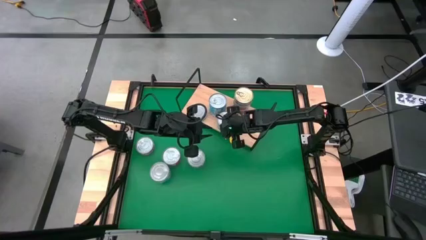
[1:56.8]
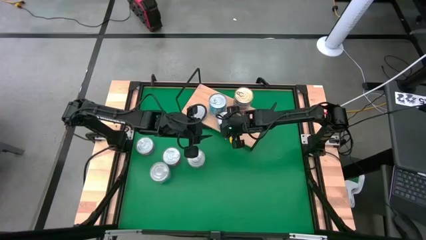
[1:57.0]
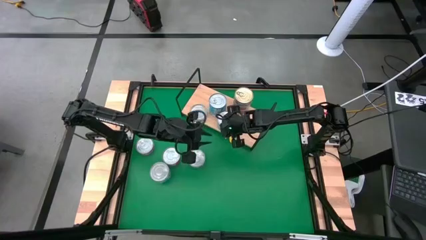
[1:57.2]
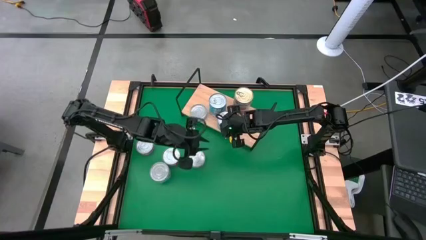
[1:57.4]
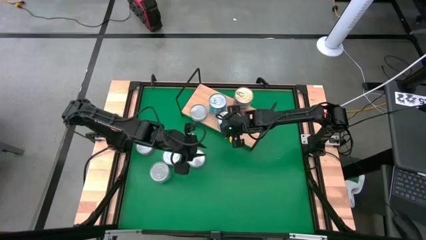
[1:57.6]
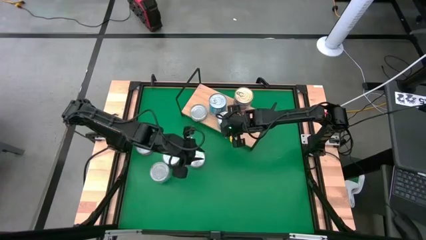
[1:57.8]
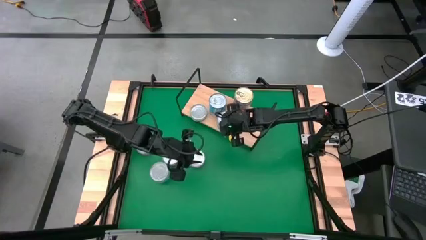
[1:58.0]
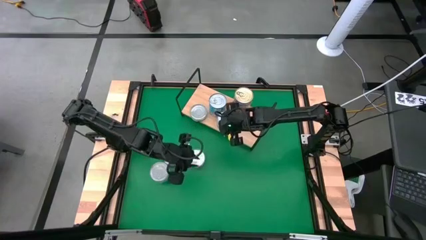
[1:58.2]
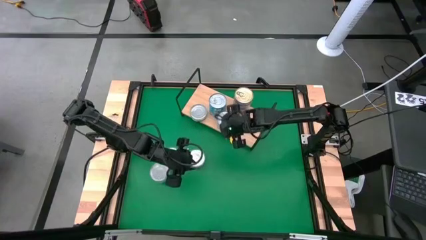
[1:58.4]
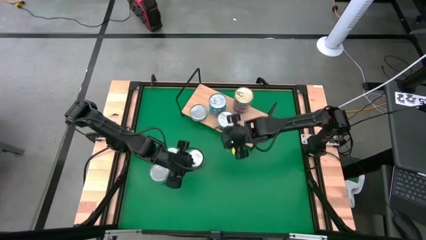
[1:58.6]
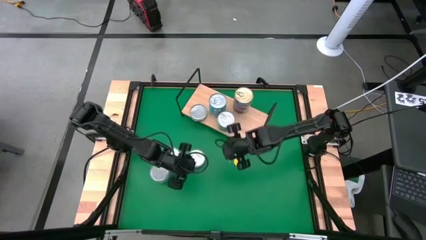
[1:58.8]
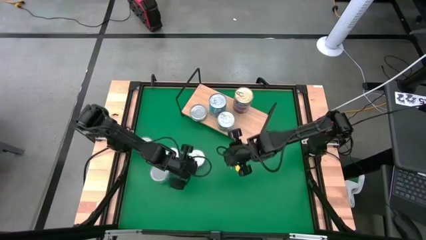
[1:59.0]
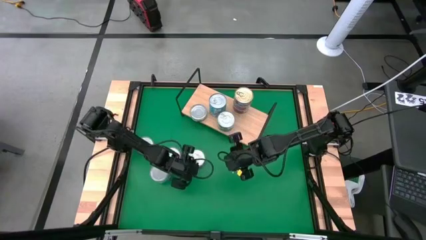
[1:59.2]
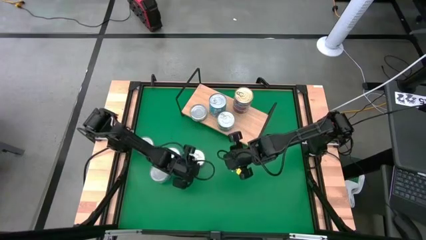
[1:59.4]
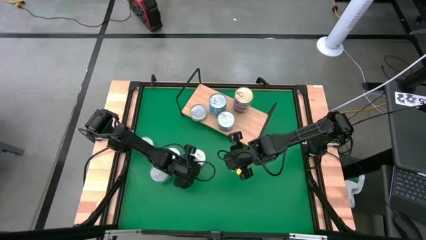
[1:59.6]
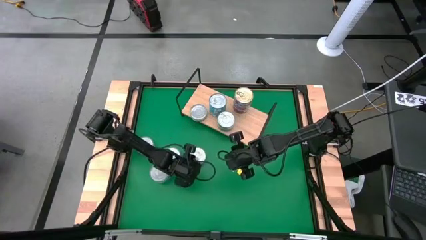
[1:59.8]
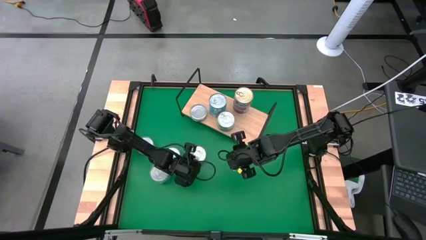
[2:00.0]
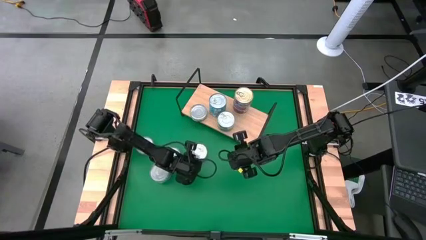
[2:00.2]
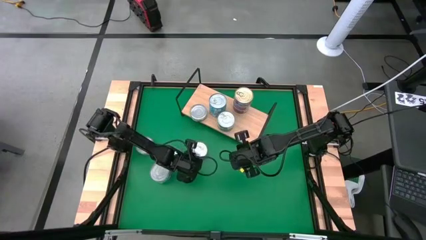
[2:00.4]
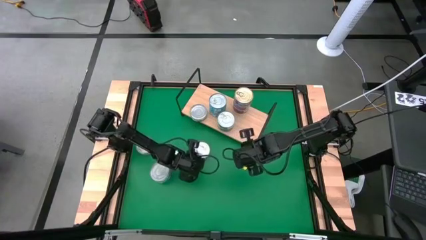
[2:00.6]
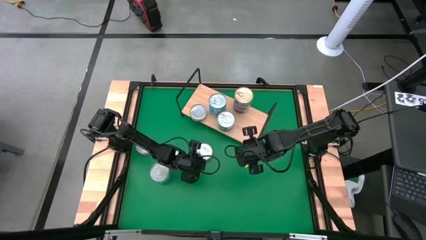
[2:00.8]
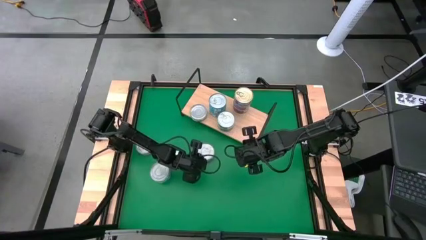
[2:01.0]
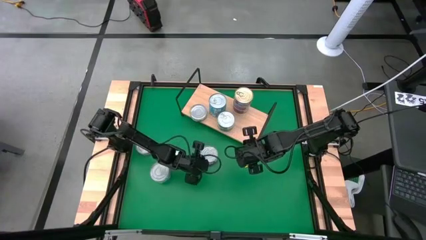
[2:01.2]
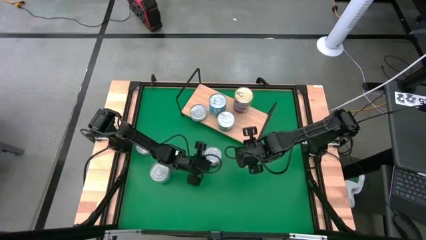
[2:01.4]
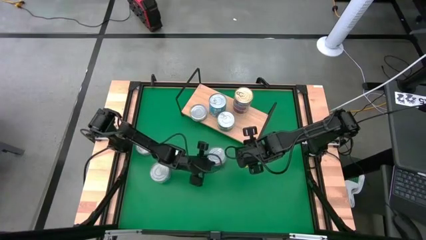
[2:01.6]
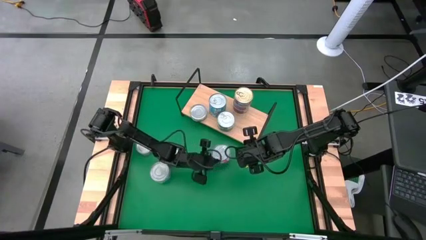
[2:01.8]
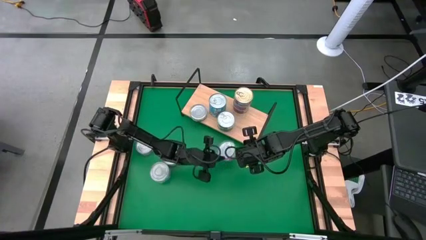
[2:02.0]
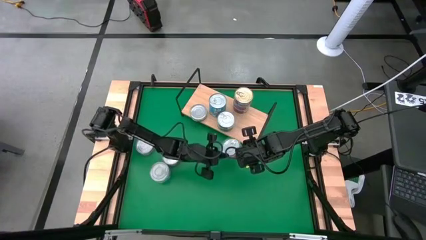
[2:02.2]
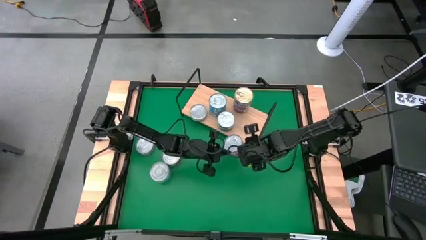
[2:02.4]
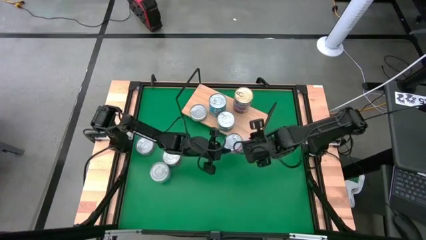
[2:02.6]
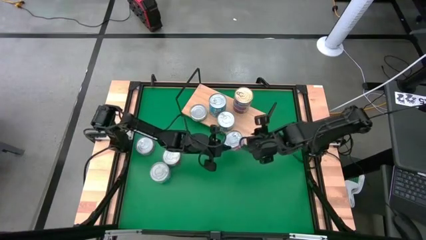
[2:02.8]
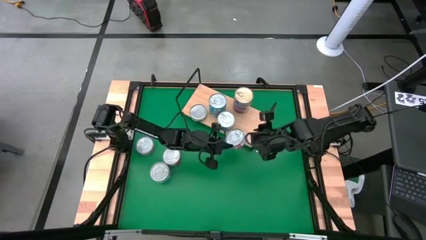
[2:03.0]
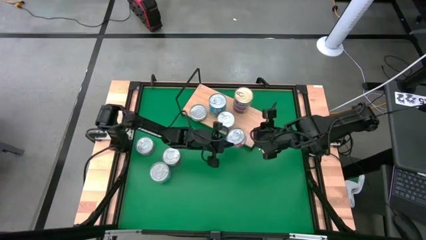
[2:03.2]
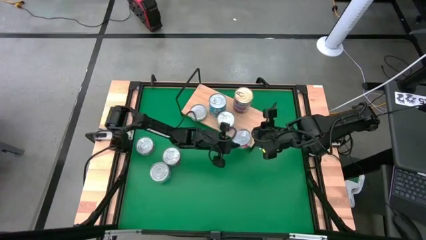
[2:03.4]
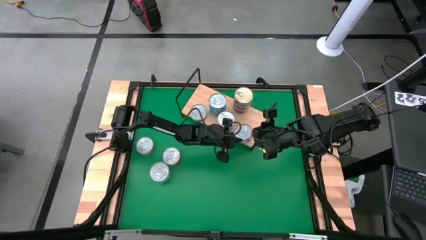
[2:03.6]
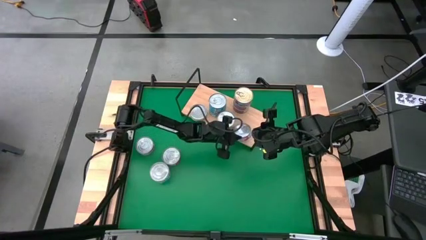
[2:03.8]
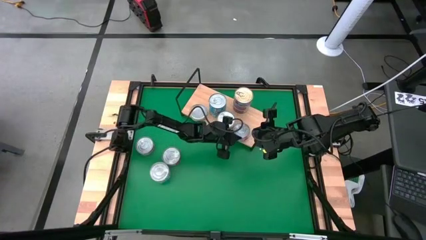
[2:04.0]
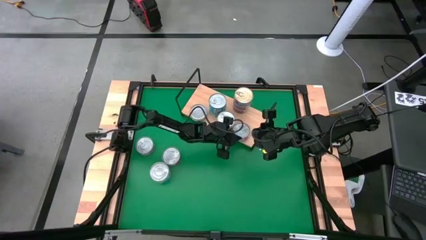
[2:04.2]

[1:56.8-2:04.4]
Task: Stack canned seafood by type on shelf
Put the red tuna can on the shelf

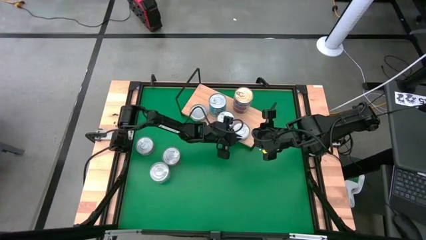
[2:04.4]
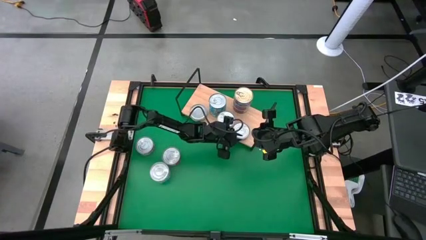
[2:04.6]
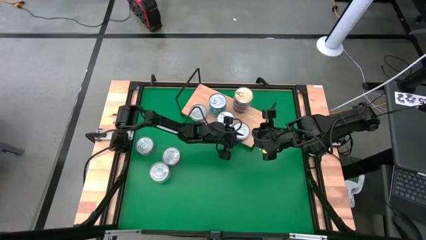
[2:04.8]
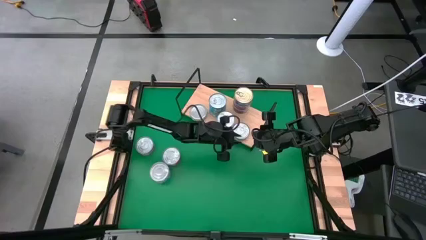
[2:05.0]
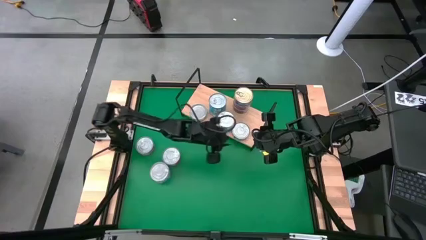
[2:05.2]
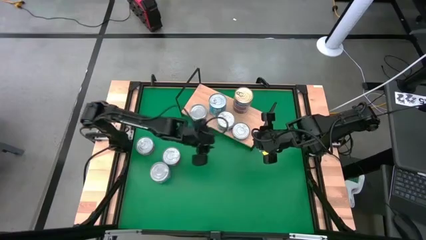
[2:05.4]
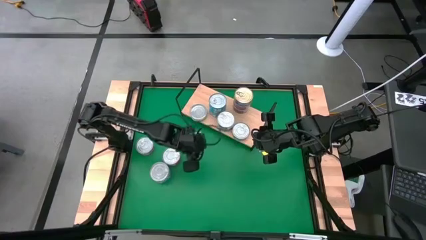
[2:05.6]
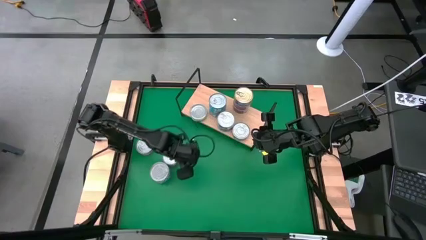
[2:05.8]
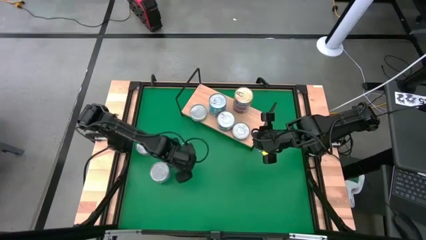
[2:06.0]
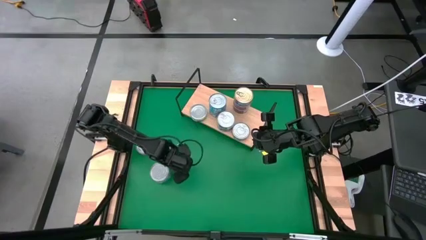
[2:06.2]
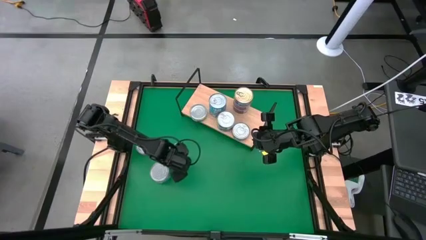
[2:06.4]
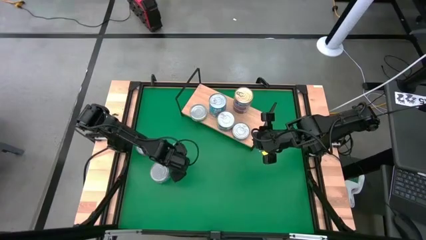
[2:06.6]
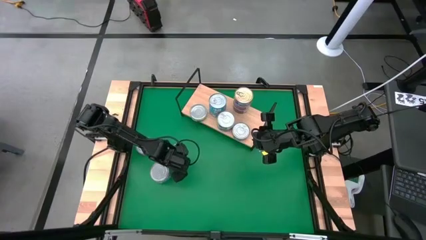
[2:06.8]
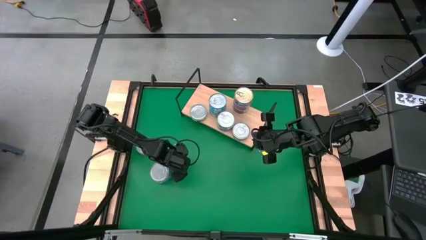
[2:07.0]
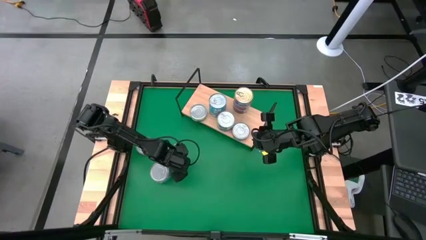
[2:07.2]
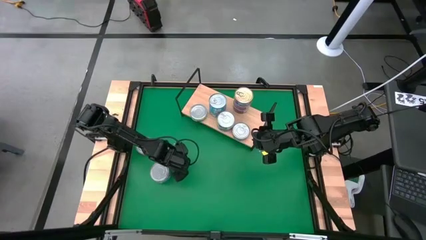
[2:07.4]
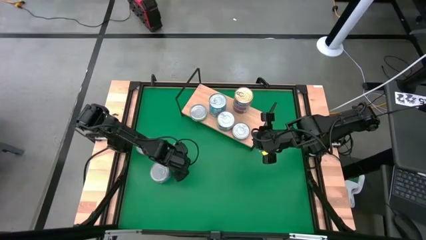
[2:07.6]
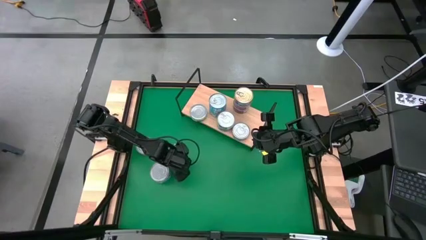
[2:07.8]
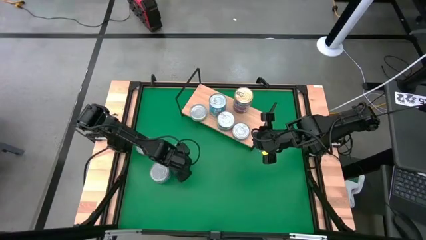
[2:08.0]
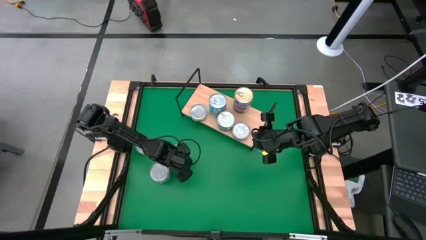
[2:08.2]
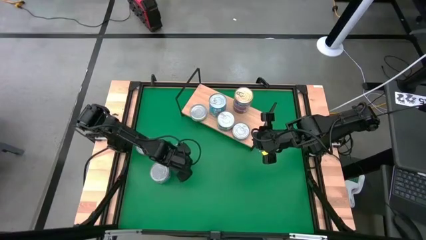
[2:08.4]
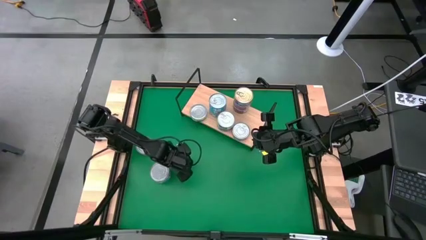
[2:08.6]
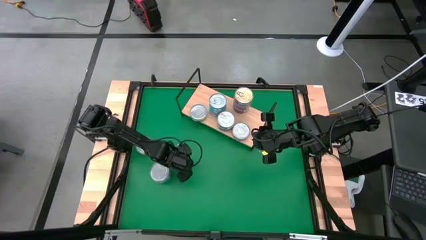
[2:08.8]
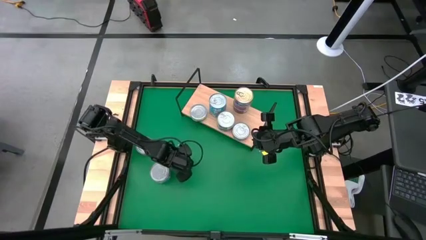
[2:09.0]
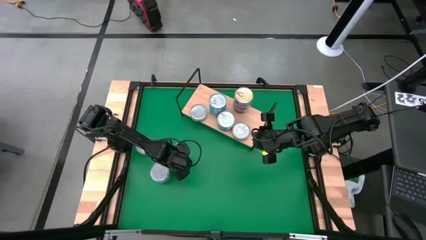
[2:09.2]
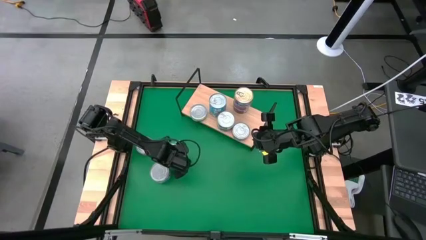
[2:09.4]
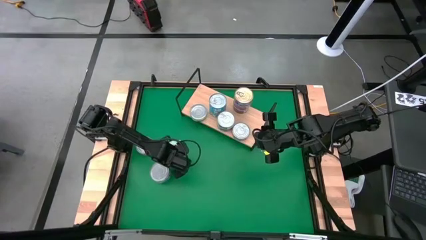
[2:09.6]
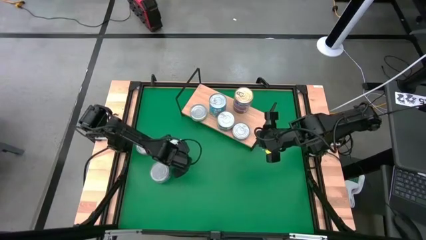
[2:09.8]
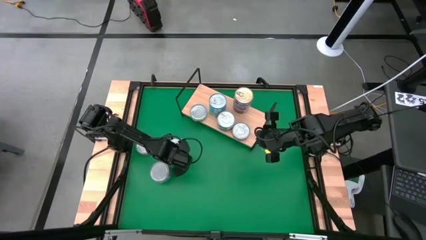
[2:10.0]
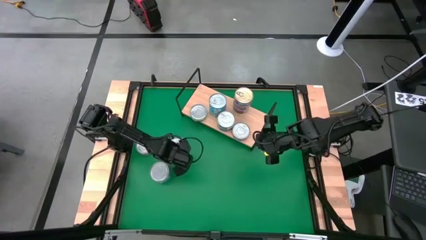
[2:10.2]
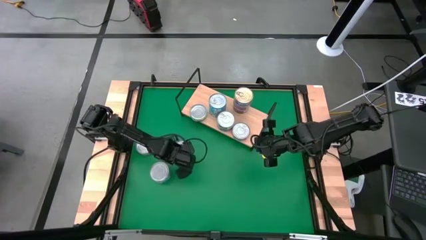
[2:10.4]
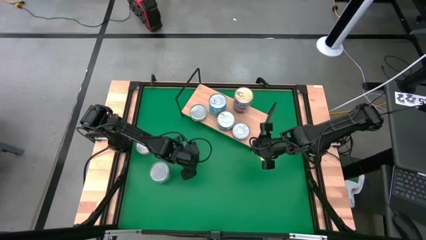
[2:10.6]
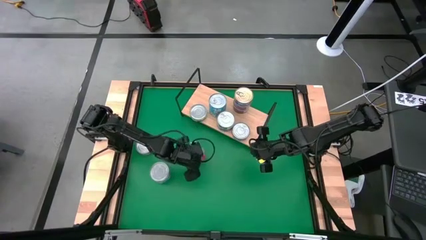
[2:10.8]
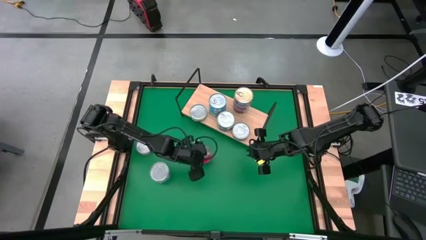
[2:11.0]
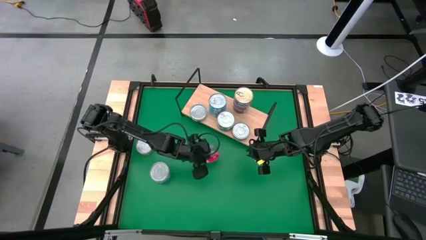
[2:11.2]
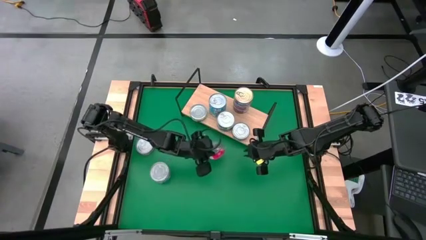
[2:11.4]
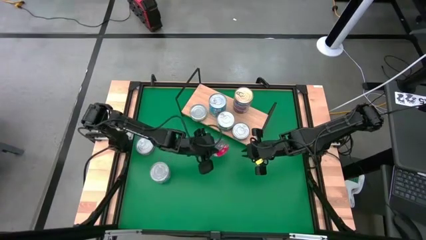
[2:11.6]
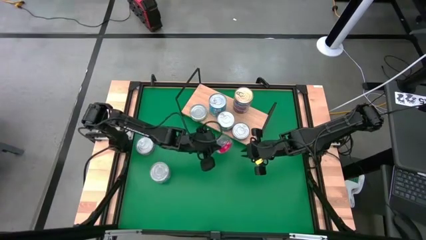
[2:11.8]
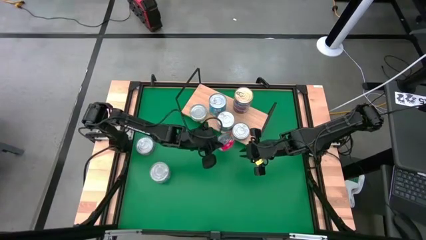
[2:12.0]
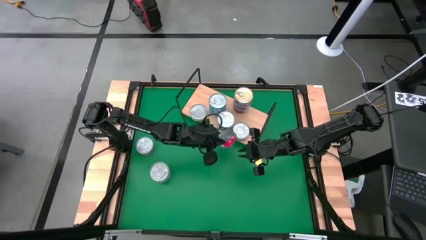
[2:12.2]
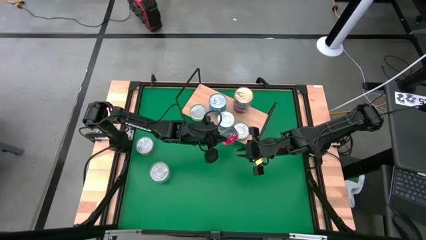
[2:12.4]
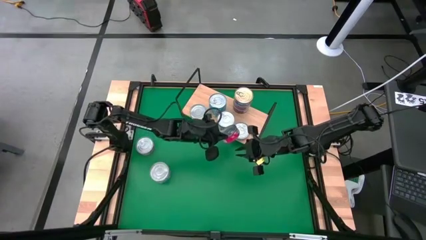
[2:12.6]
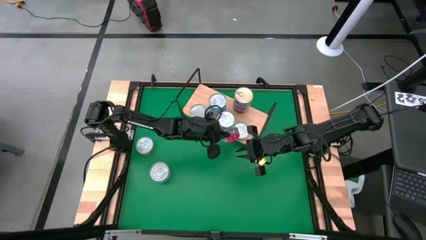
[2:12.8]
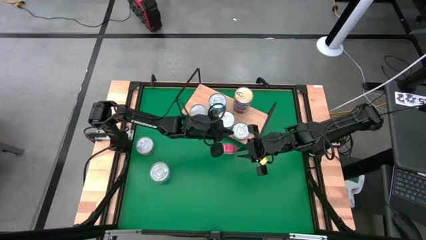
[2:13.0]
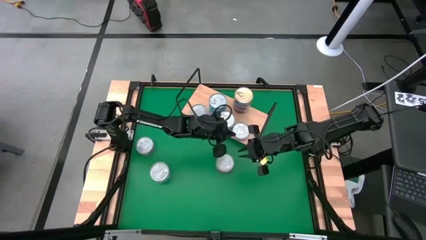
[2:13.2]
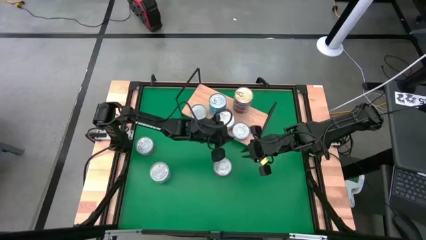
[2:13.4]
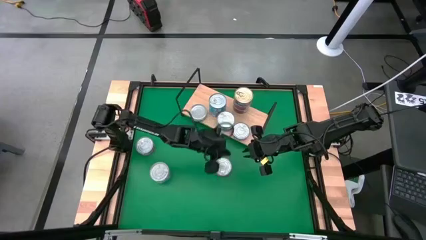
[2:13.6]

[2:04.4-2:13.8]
Stack the red tuna can on top of the red tuna can on the shelf
